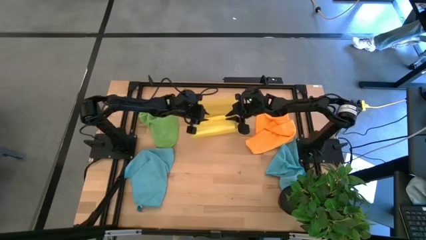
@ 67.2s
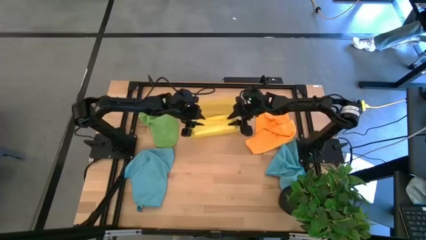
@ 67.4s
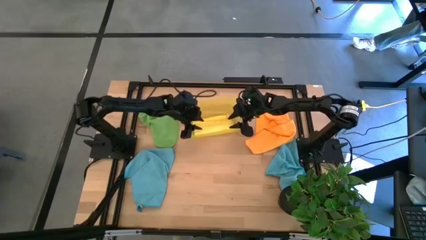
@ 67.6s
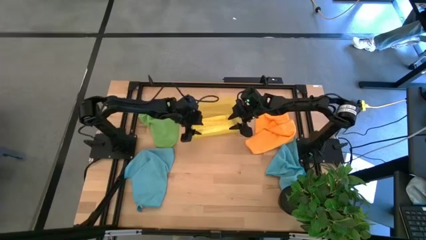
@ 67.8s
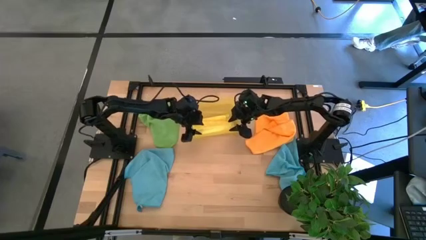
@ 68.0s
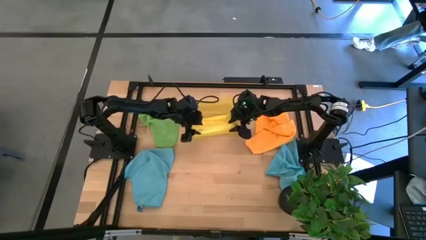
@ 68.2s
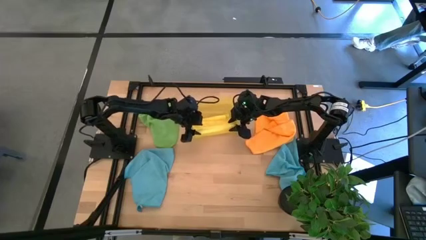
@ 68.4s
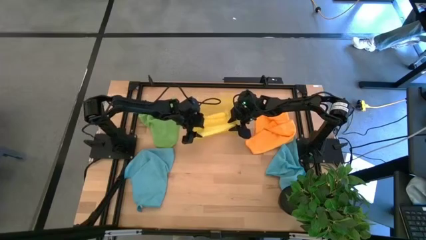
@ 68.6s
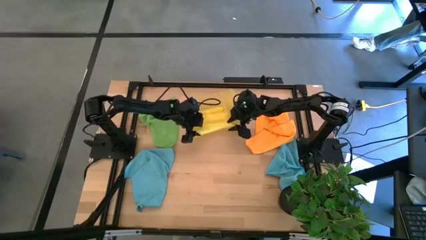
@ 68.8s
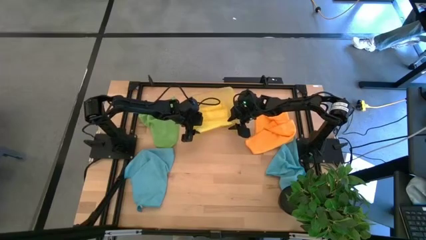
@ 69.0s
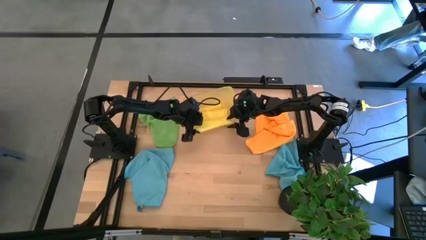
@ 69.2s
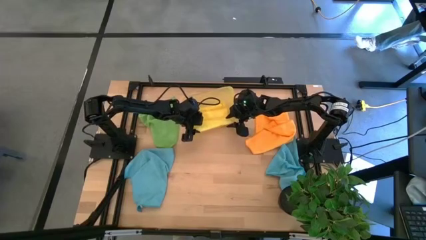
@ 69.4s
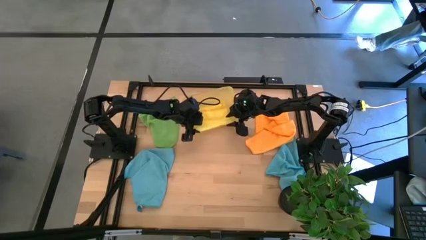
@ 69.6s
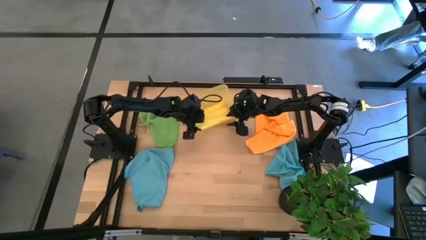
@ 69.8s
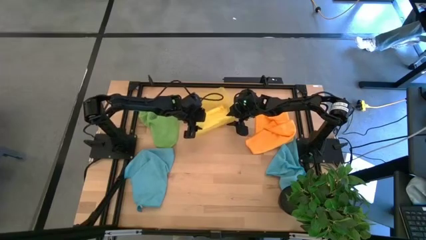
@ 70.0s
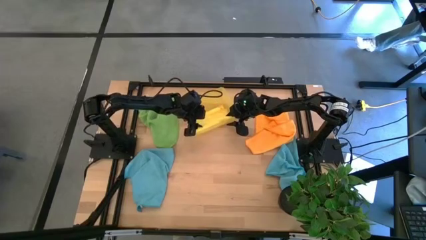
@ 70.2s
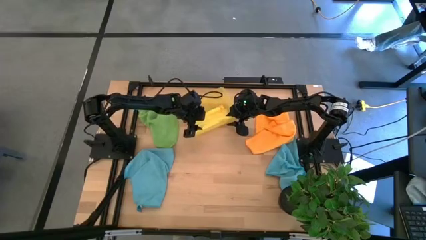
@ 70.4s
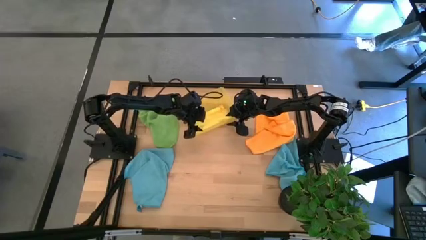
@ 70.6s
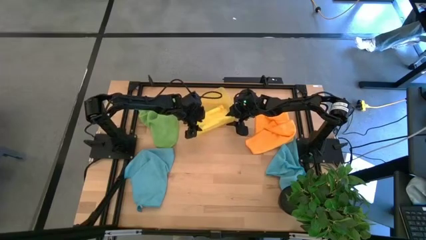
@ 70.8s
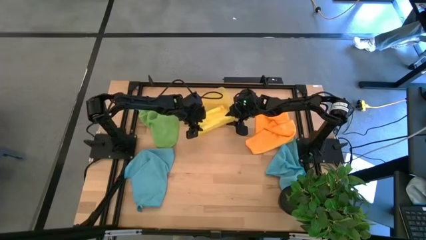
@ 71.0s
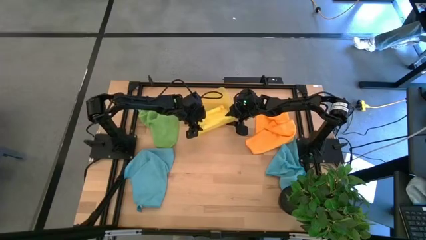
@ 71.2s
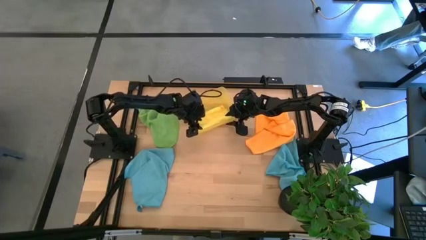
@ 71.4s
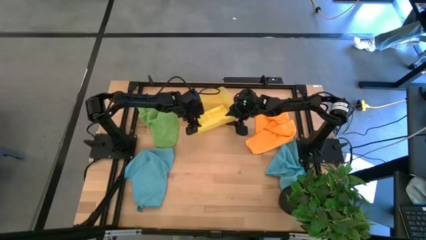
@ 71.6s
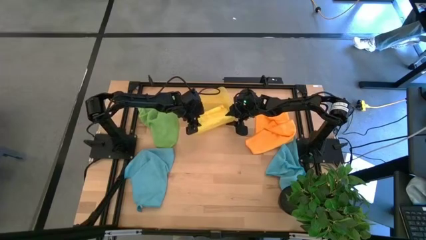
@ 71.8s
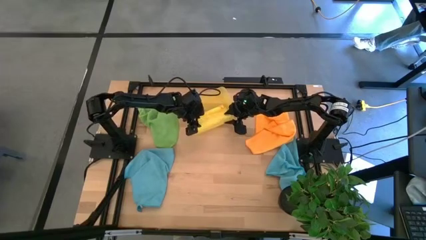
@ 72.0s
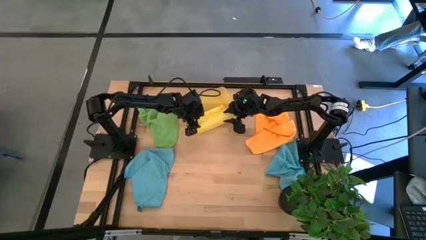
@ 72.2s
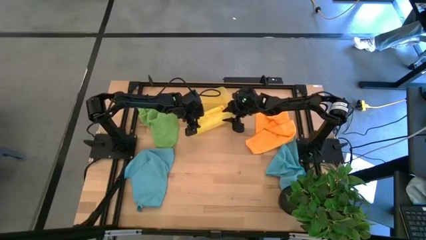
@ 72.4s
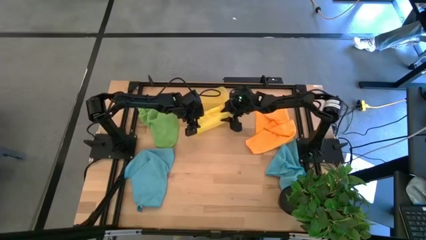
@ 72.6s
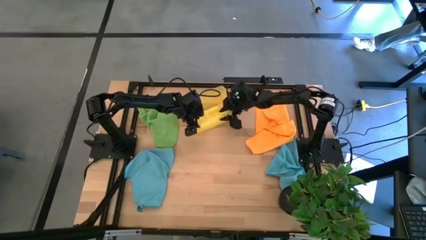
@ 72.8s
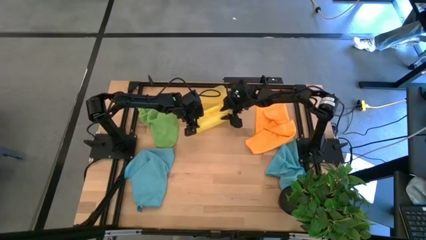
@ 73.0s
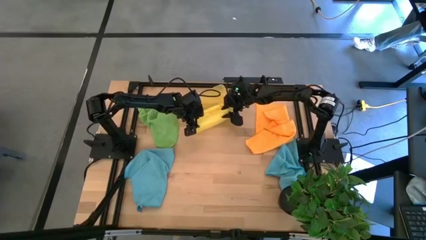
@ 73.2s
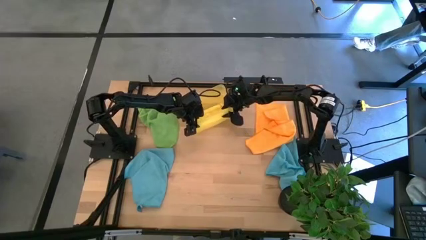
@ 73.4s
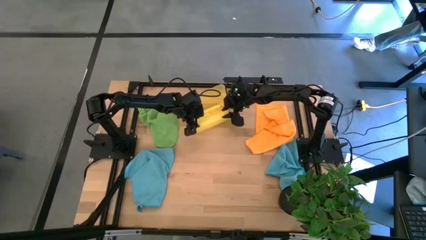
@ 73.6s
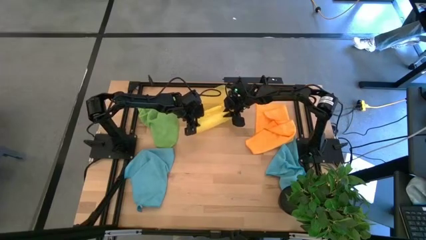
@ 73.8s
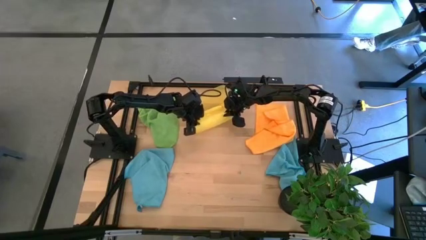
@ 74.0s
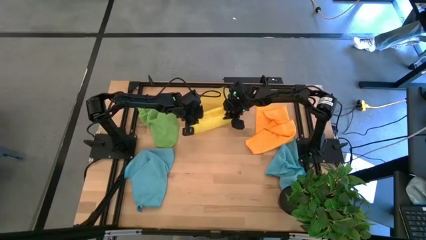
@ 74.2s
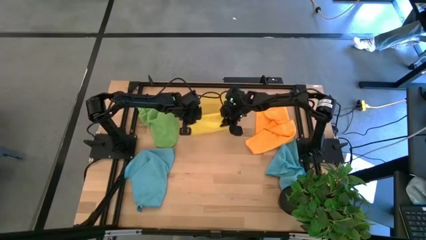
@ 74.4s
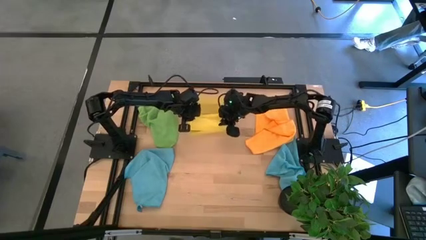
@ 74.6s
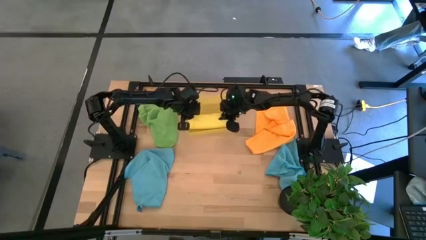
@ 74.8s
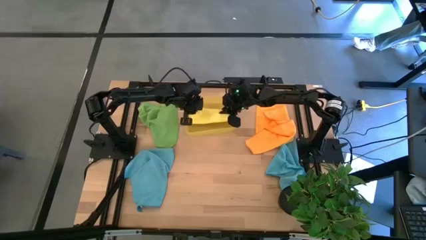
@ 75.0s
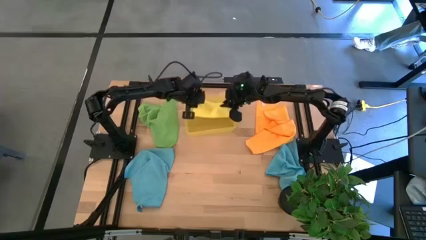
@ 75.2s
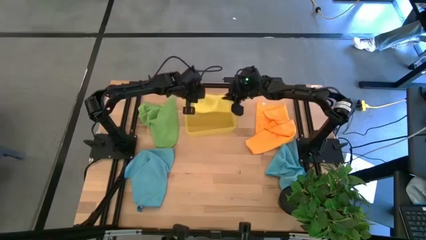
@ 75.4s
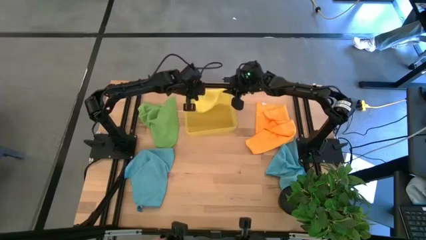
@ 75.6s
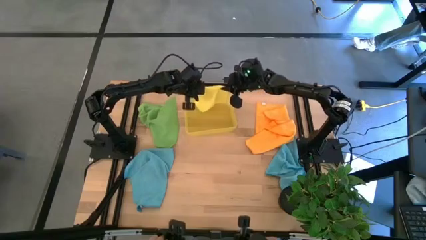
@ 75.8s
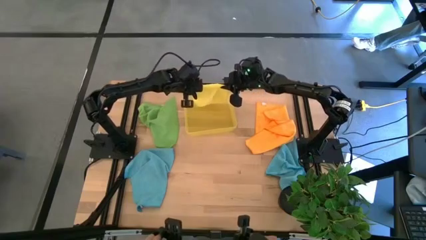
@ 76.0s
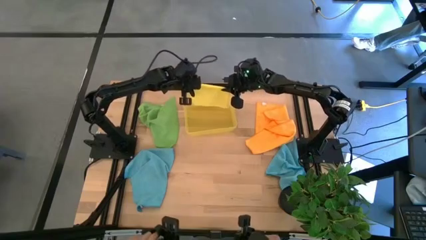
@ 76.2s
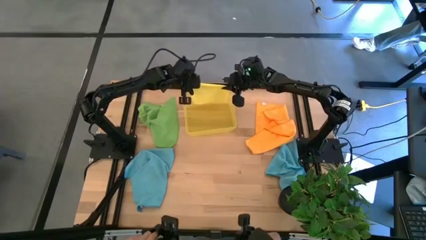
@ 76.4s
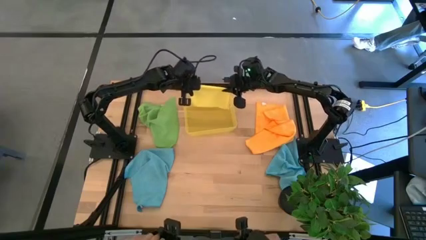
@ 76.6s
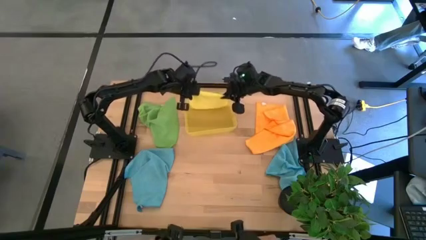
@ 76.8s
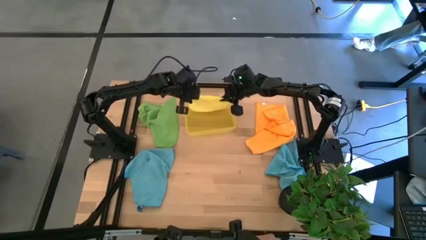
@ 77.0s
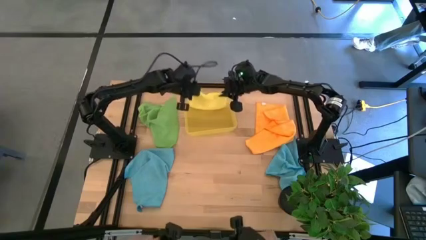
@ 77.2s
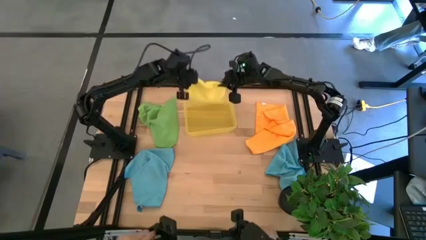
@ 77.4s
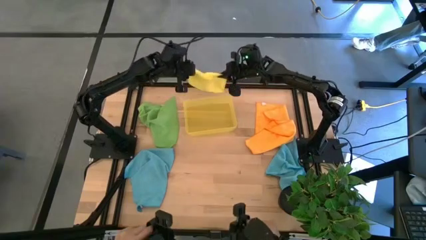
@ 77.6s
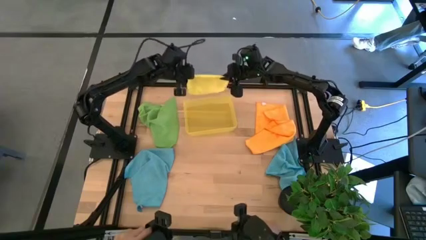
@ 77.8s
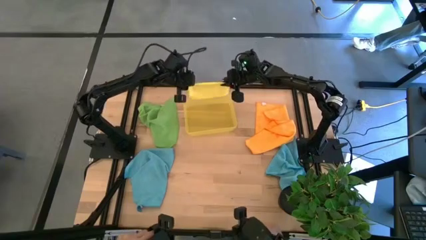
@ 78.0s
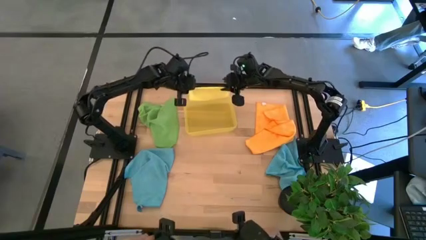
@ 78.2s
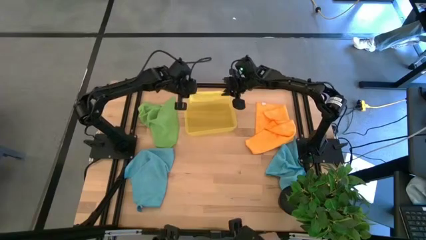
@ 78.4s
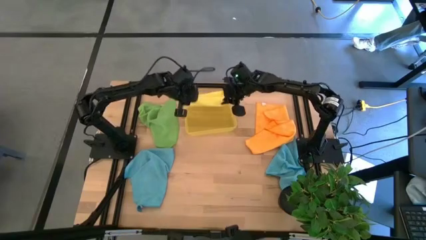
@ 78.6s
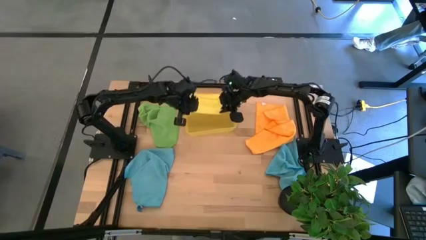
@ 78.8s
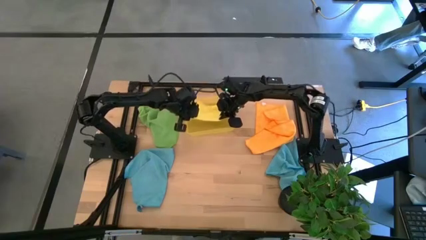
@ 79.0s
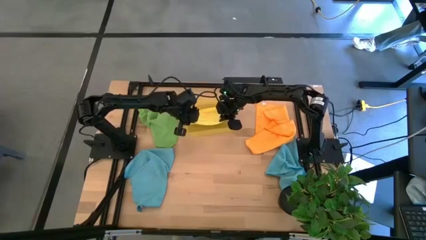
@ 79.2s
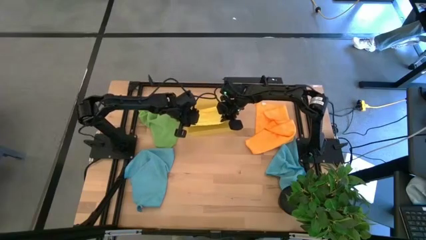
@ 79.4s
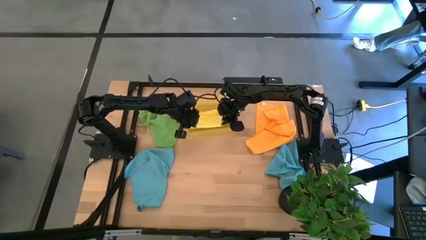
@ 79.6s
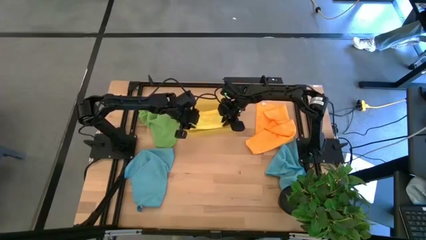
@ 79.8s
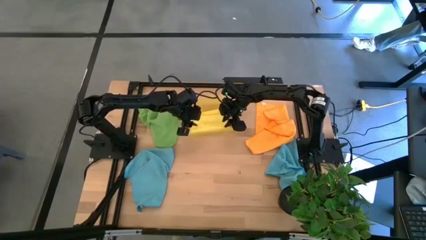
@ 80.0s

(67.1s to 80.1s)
Task: Fold microfiber towels
Put the yellow towel into the yellow bin

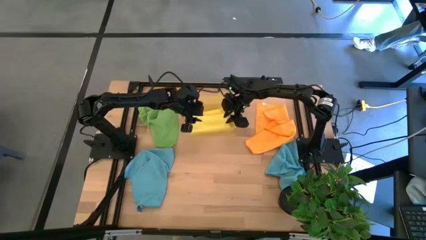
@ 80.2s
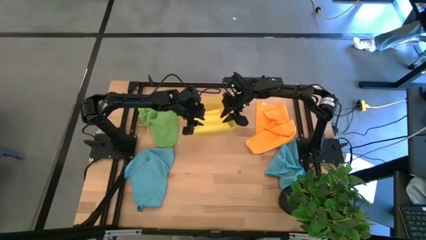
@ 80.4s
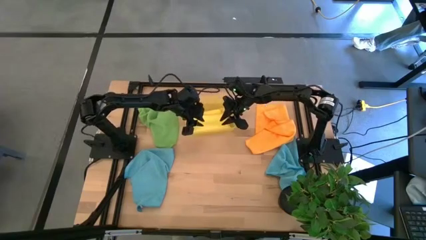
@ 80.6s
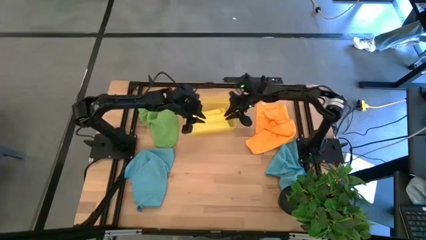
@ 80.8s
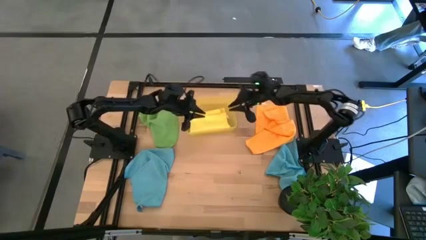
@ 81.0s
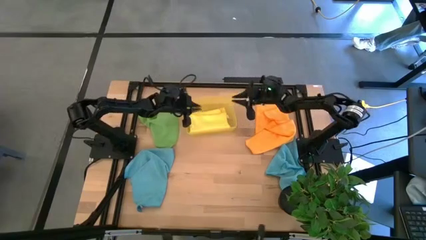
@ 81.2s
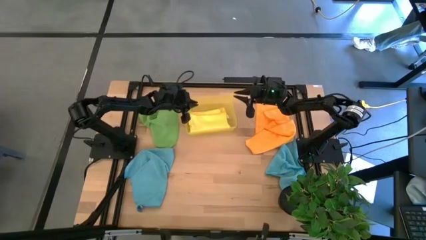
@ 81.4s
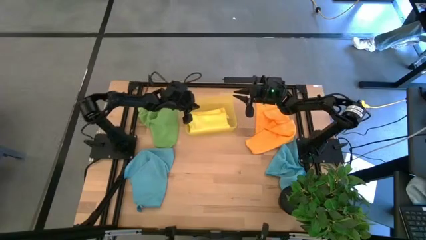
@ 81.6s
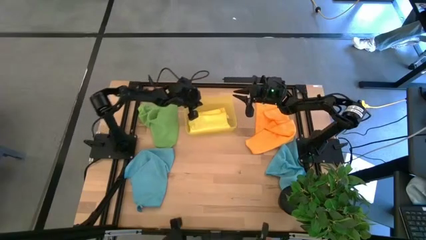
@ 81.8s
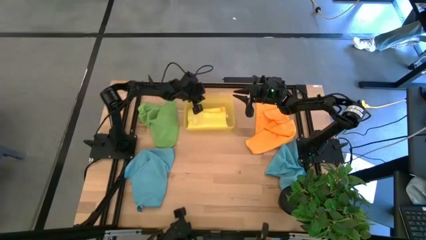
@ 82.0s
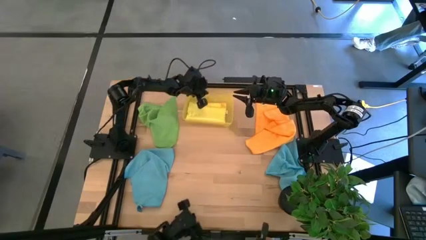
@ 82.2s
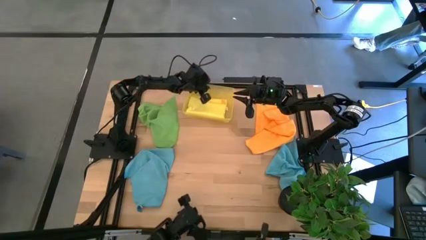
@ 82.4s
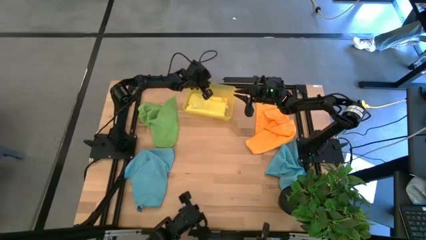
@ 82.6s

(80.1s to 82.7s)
Adjust the yellow bin
